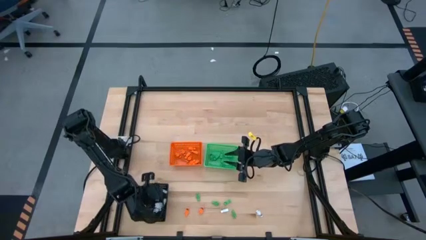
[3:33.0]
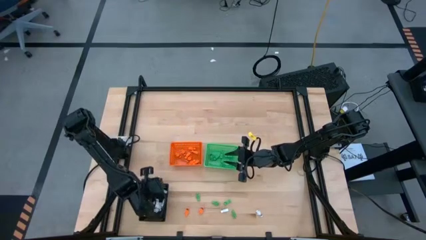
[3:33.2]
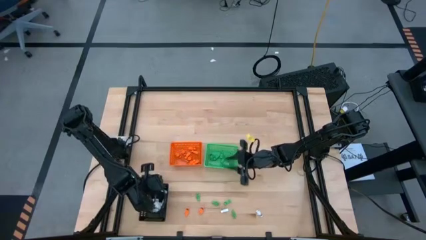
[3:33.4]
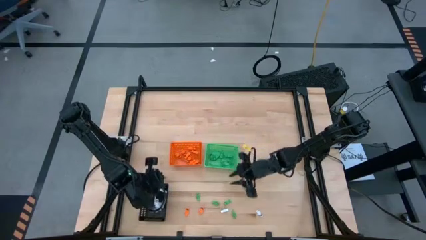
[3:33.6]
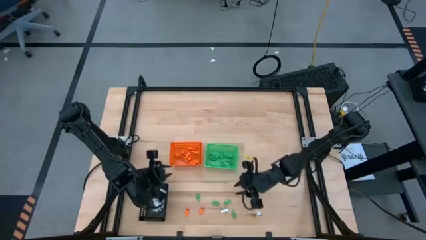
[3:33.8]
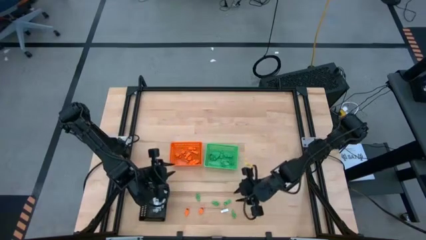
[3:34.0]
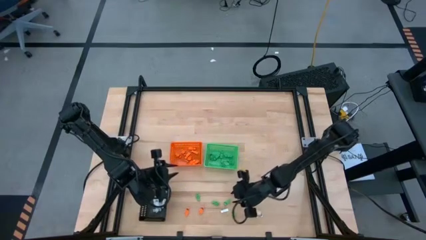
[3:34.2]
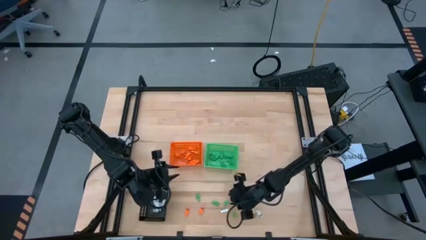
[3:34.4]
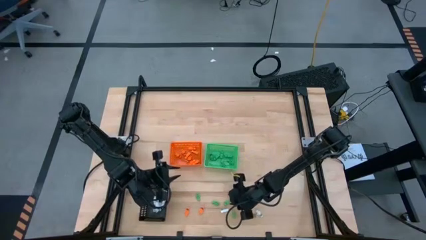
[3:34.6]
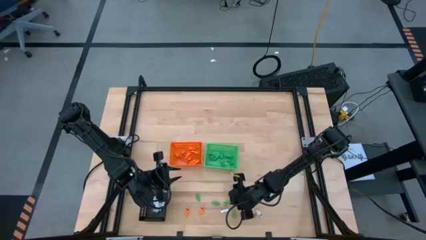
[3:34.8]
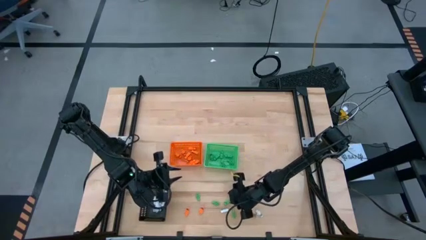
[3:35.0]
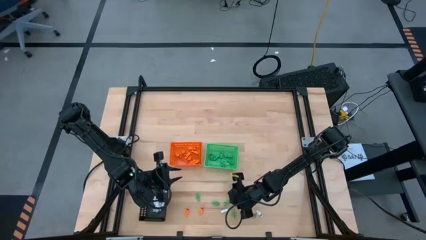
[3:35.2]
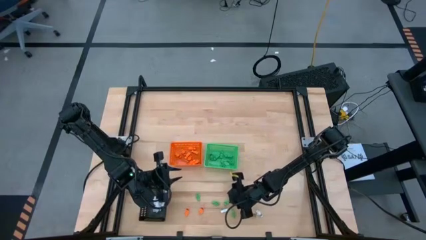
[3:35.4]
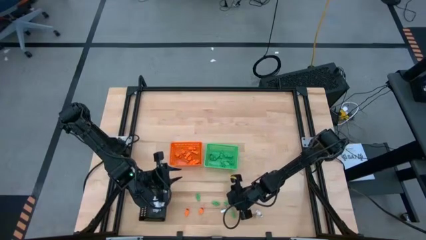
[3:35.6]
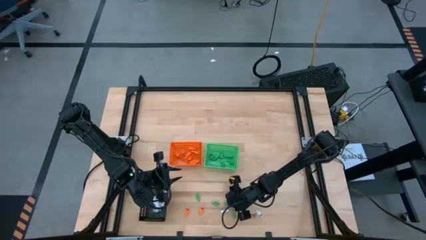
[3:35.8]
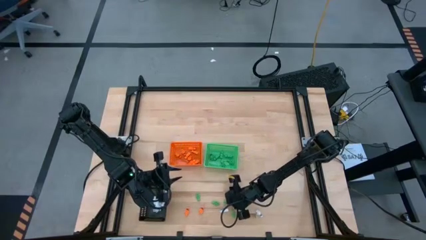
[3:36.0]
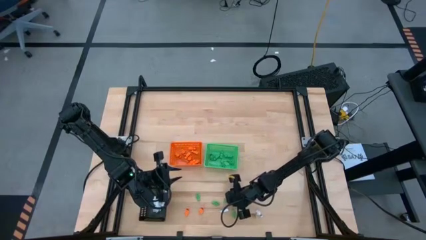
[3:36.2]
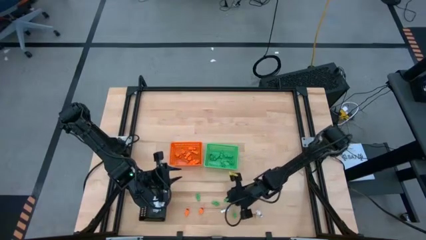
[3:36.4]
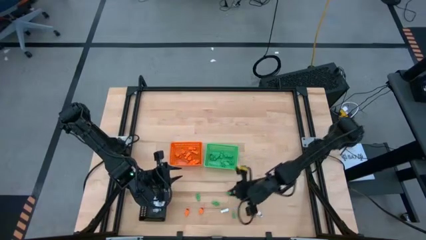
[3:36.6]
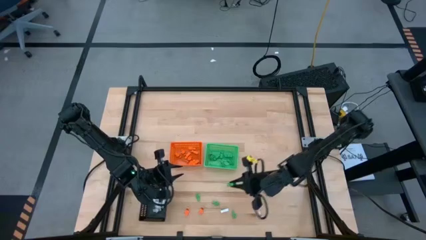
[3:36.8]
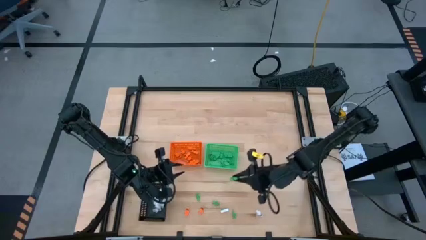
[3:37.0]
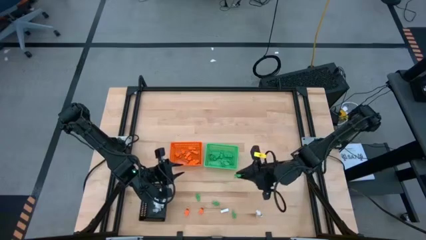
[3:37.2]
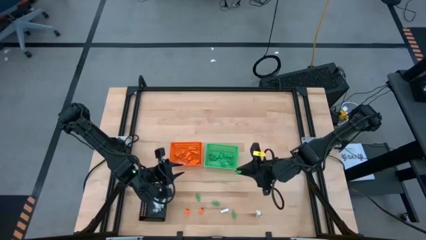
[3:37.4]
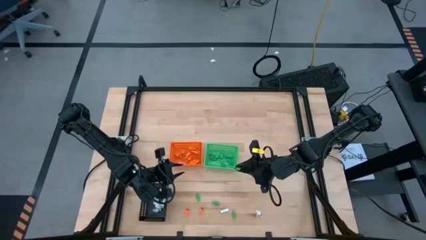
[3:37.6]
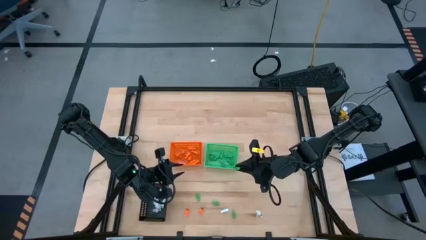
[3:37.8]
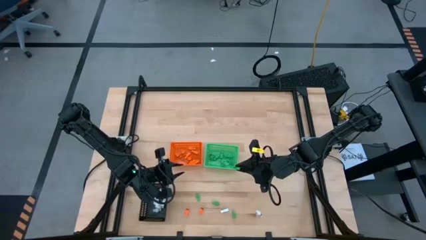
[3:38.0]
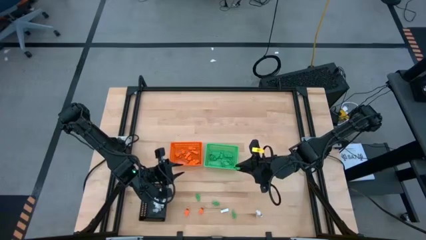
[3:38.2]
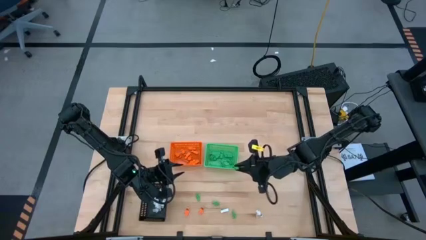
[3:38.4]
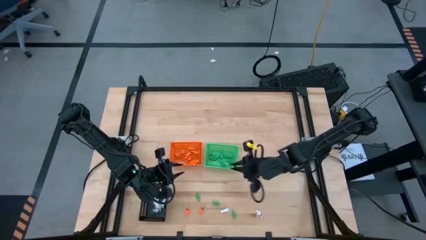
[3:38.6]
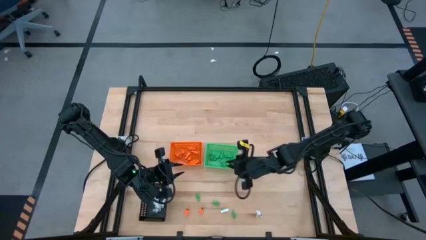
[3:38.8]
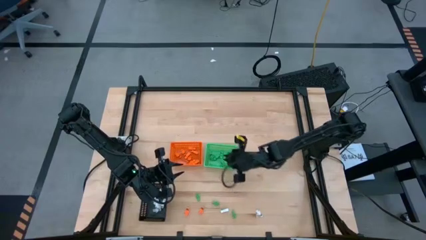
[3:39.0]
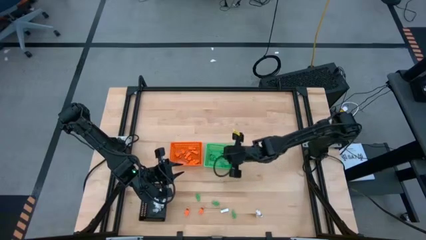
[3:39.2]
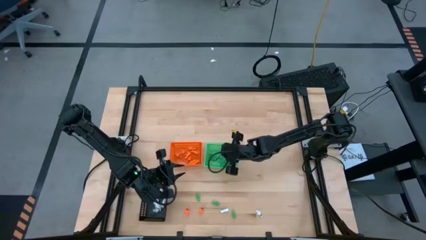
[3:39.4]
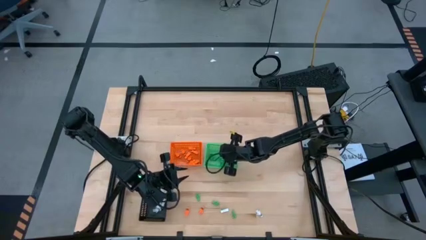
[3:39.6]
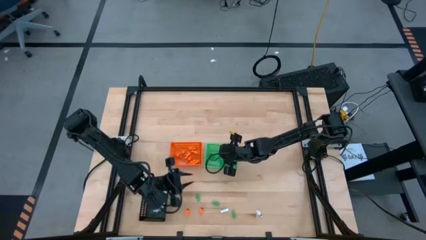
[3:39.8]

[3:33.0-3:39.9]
Task: Sort Halloween decoration
Put the green skeleton toy into the green bin

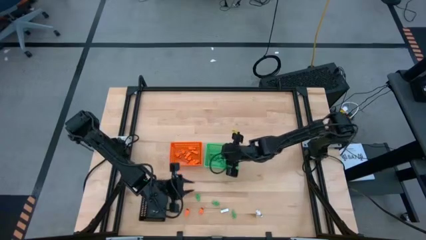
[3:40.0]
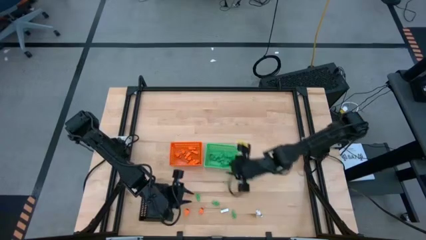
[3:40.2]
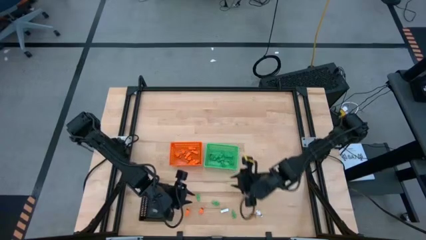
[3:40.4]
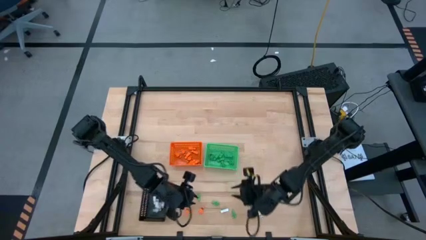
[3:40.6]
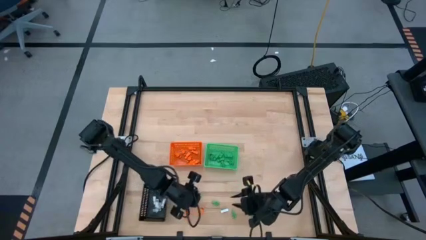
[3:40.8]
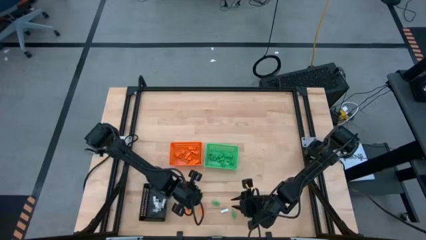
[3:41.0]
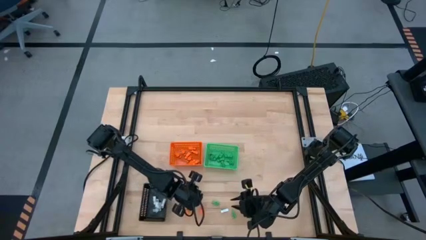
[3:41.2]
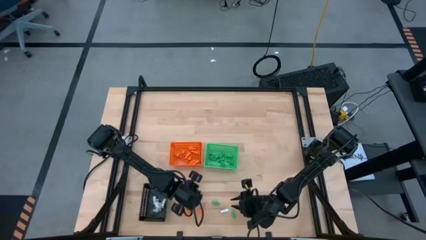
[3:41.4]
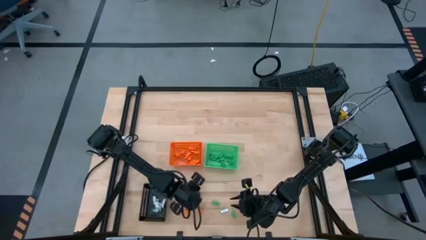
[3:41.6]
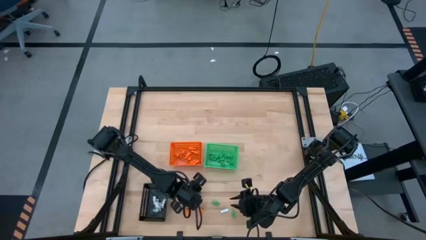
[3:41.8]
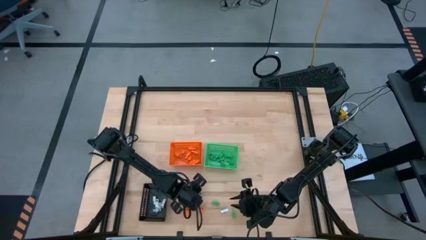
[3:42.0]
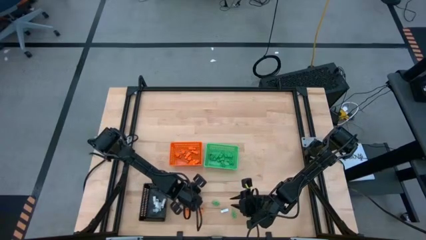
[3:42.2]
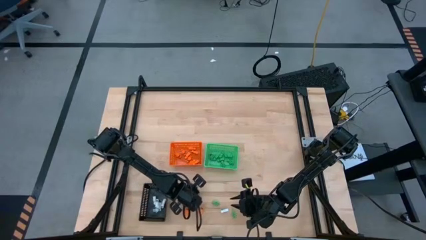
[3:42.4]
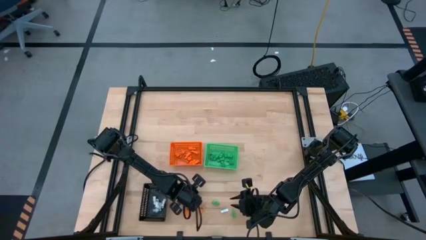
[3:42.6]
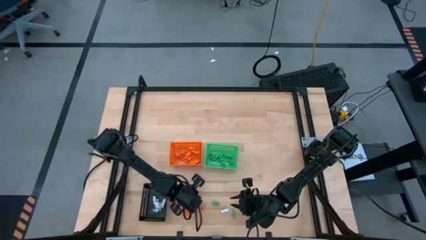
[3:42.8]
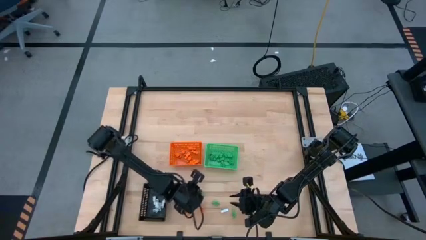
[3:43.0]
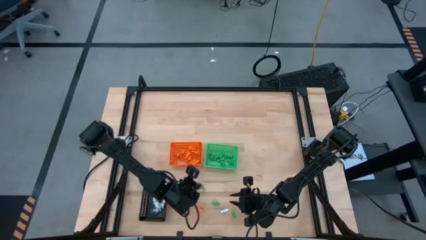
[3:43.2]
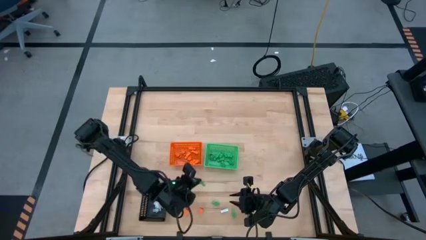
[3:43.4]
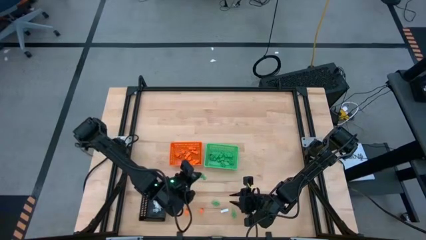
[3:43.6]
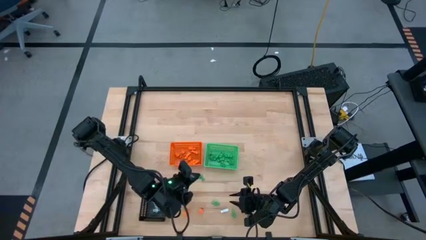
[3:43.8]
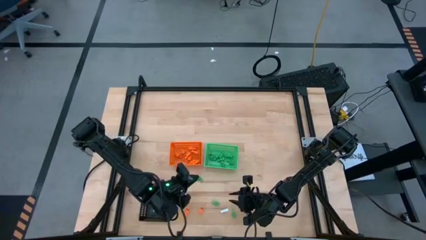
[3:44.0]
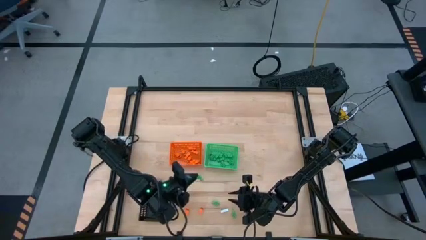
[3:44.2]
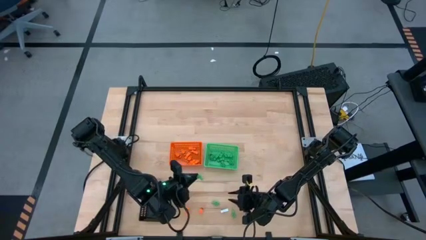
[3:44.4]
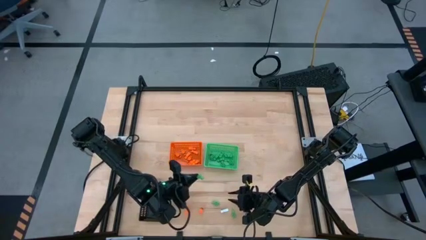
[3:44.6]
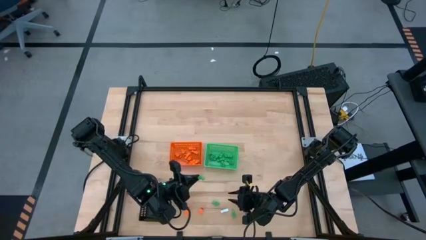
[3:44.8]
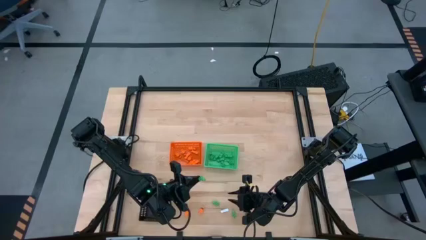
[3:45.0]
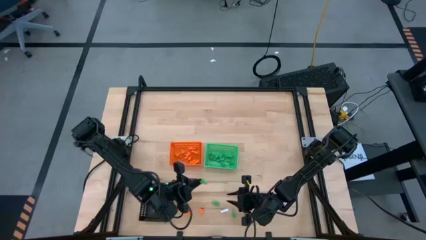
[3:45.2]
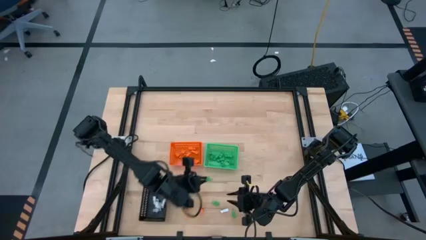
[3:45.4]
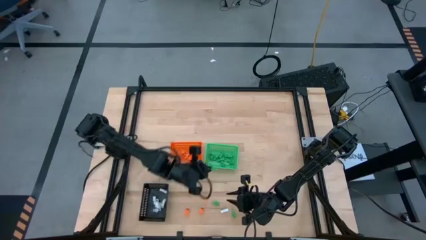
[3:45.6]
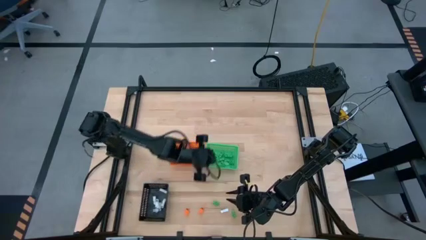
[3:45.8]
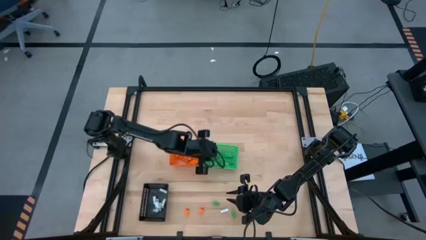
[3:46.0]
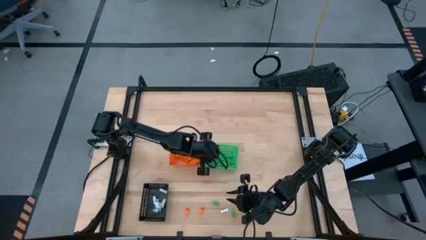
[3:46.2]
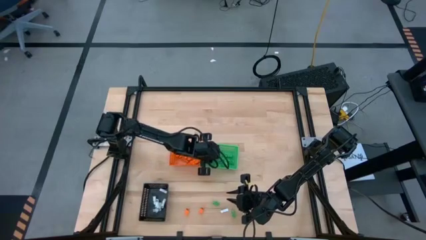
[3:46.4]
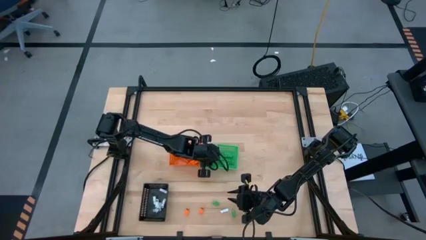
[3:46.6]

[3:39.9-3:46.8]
Put the green skeleton toy into the green bin

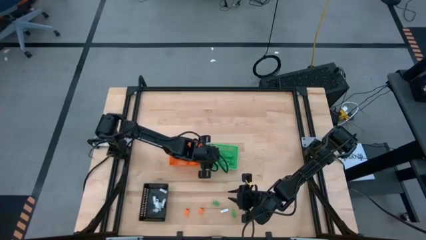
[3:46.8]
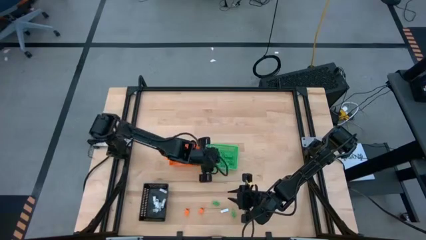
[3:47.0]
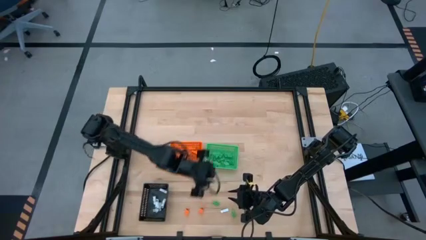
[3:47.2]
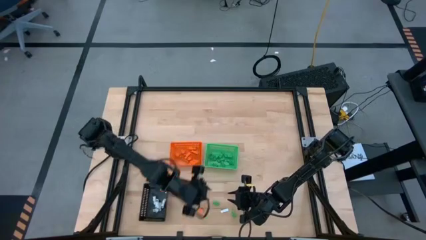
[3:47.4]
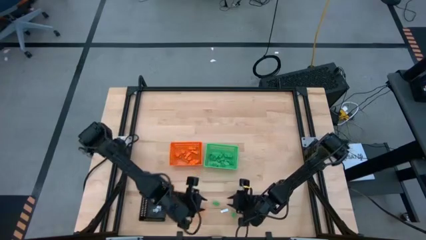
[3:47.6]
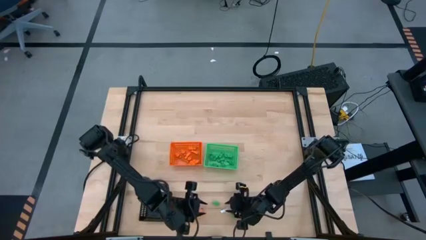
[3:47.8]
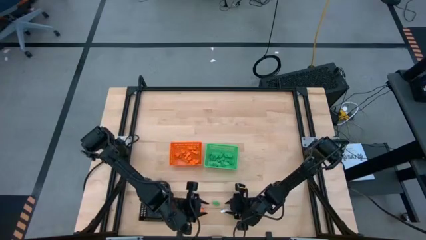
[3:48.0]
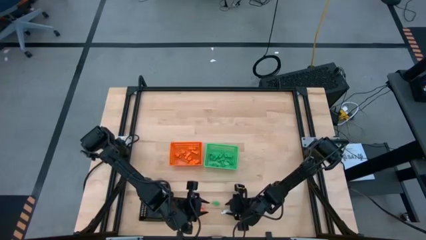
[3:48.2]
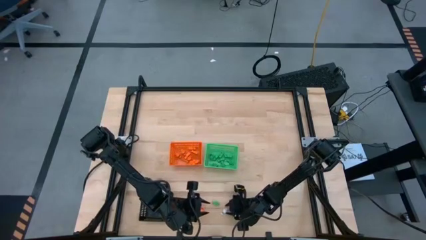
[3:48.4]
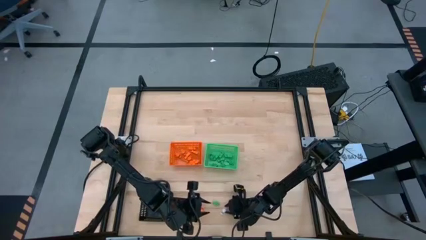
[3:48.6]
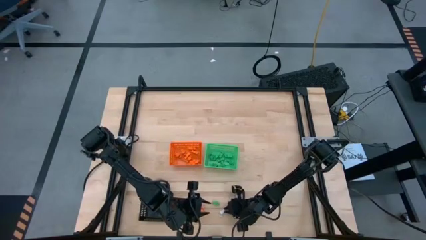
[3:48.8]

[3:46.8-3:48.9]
Put the white skeleton toy into the black bin
